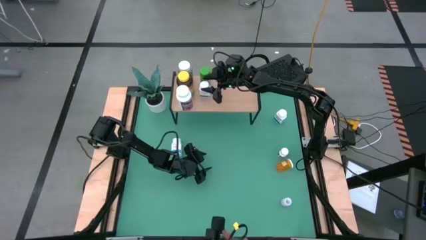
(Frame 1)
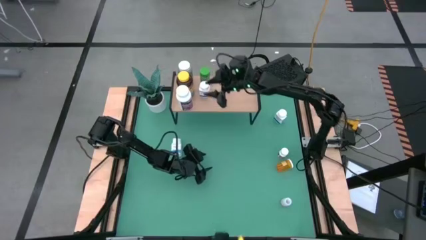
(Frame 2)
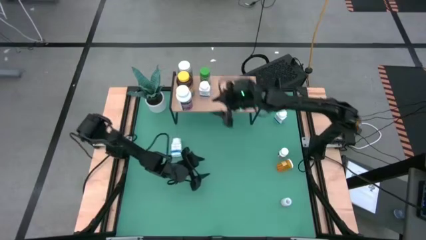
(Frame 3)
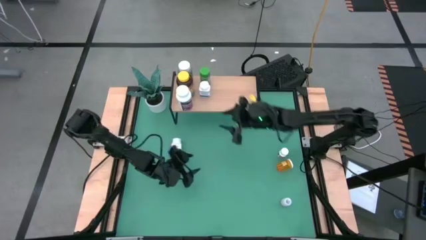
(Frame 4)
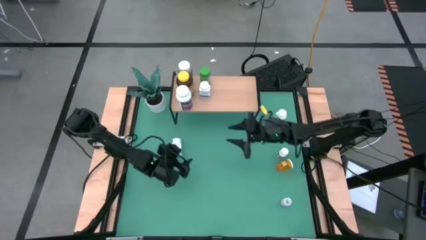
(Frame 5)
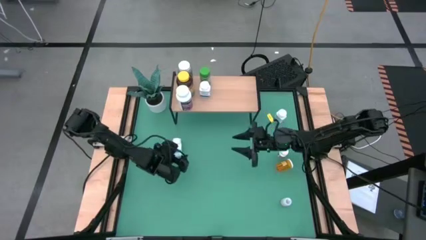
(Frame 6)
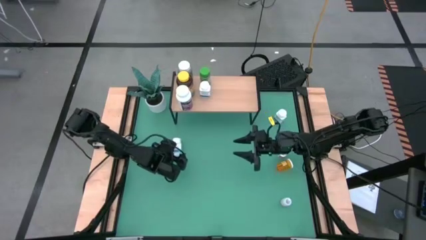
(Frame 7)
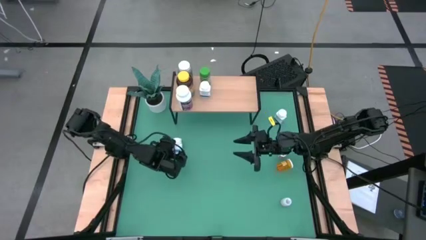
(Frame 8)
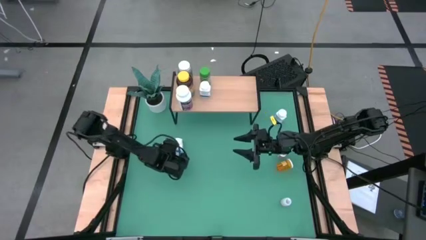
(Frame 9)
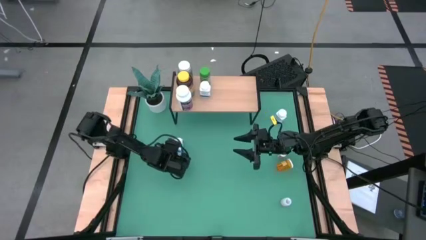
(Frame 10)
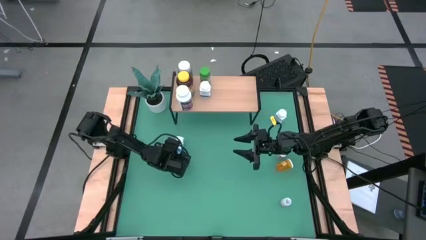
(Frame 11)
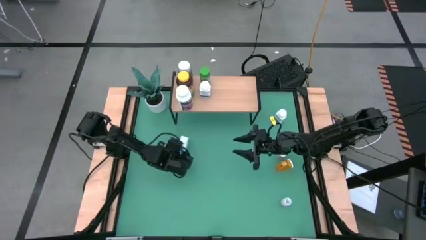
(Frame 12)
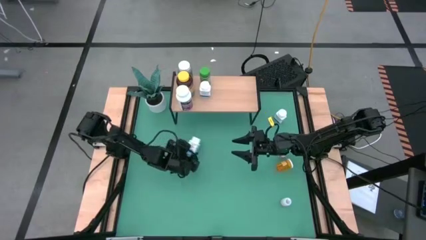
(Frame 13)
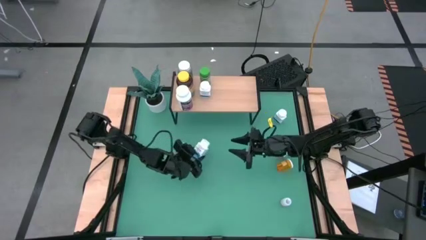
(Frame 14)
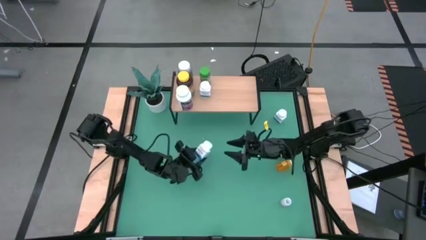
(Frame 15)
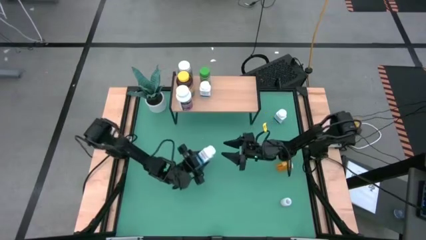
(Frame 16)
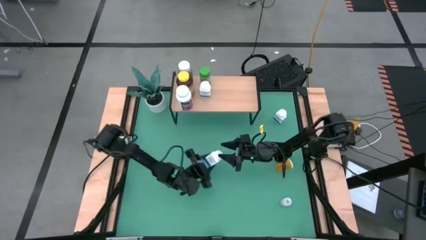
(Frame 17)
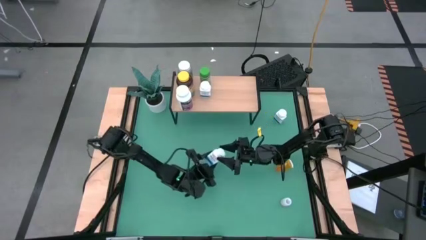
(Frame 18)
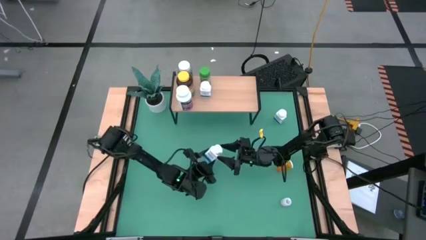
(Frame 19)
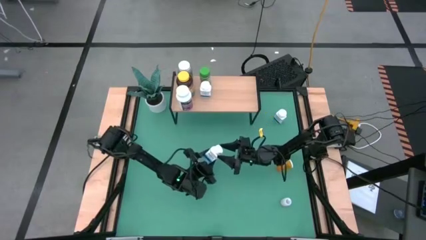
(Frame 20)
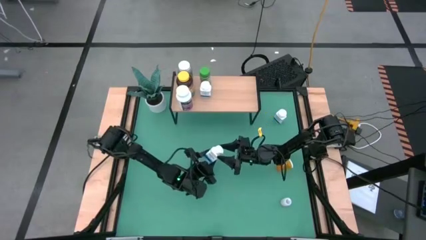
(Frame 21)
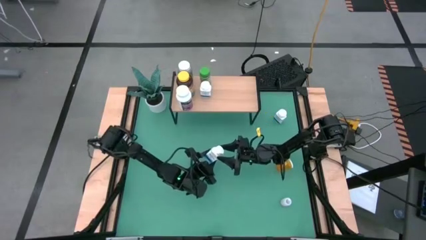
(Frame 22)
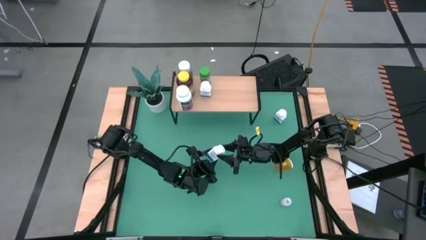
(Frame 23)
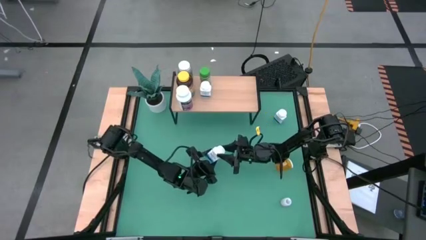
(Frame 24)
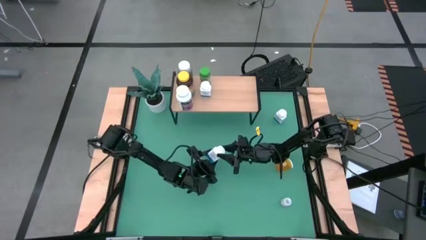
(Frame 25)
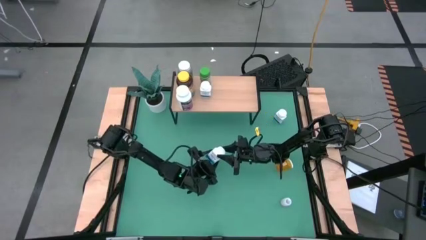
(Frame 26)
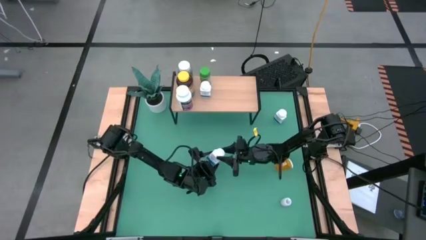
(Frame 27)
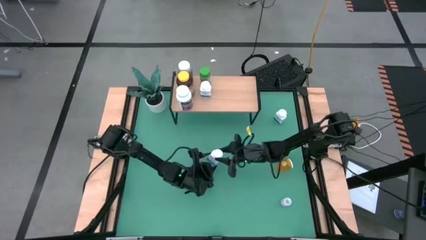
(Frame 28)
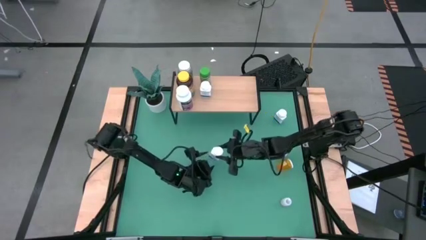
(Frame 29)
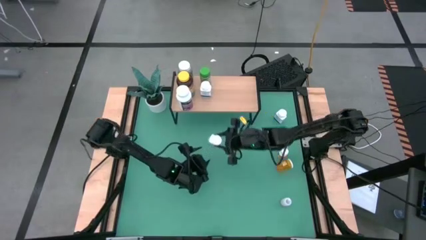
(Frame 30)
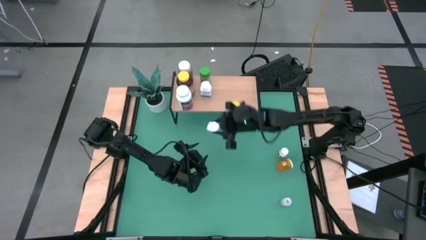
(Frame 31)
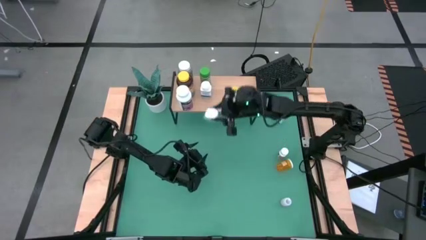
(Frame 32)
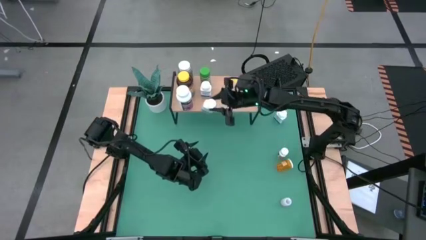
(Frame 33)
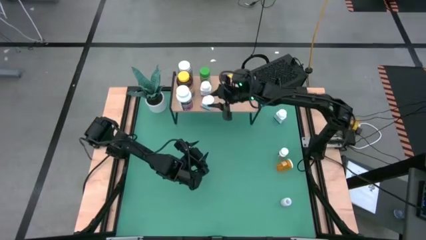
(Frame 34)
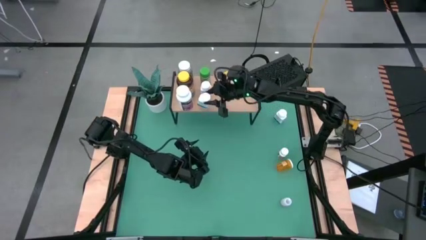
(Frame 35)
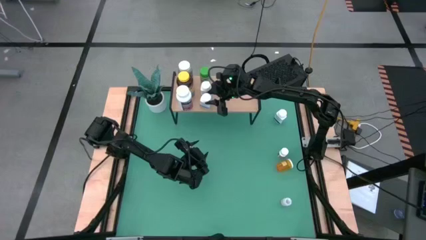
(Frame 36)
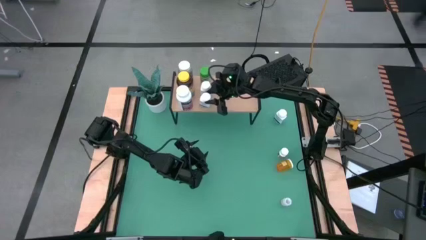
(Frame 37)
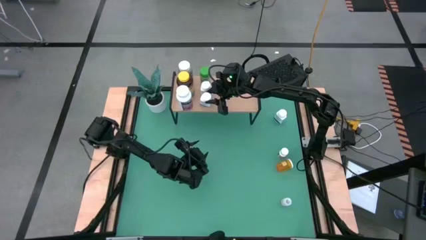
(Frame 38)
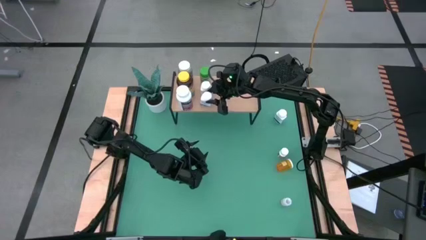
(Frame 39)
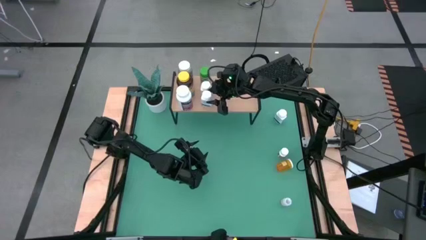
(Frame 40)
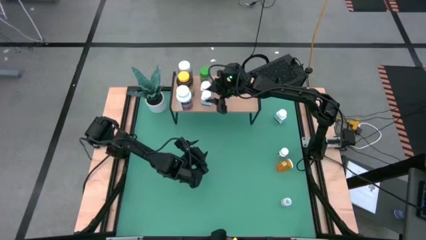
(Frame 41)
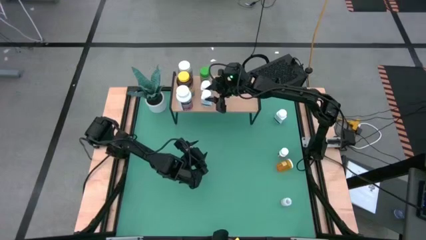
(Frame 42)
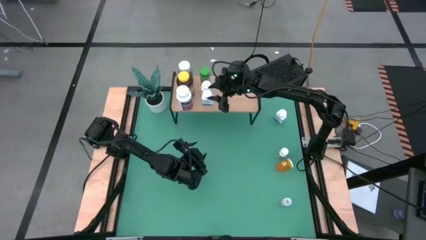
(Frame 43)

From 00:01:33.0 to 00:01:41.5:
Task: Pick and place medicine bottles onto shelf by color
Put the bottom blue white pill bottle on the shelf

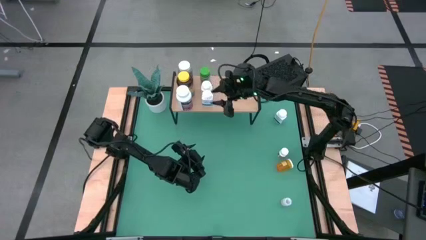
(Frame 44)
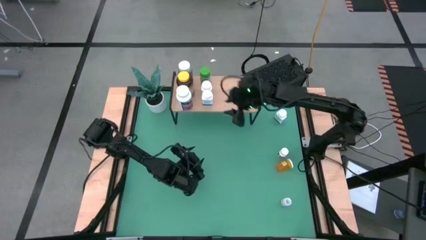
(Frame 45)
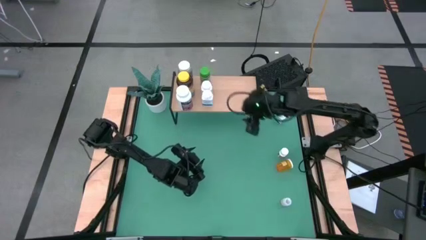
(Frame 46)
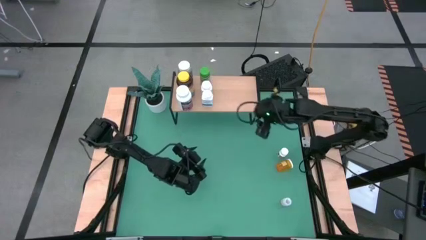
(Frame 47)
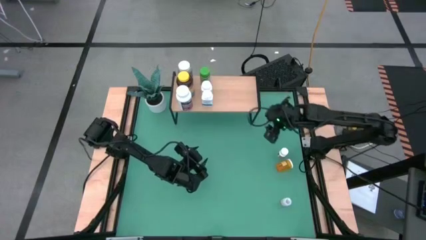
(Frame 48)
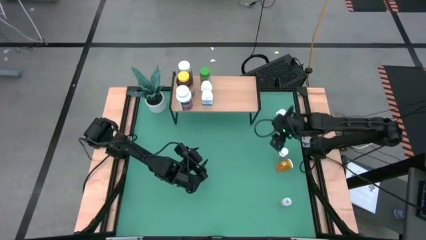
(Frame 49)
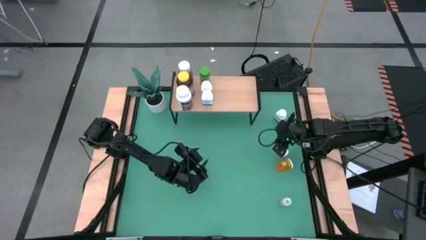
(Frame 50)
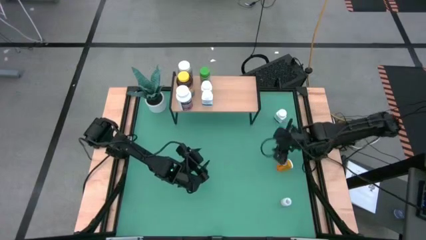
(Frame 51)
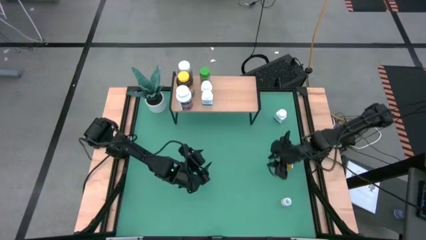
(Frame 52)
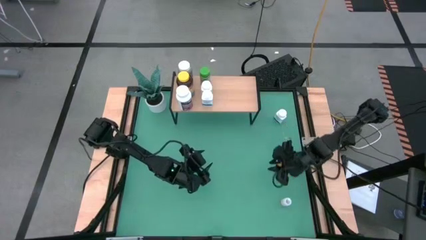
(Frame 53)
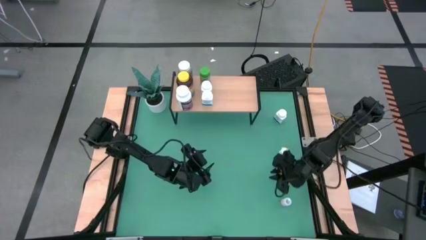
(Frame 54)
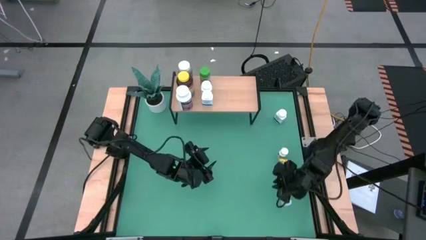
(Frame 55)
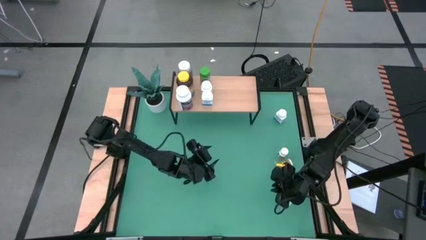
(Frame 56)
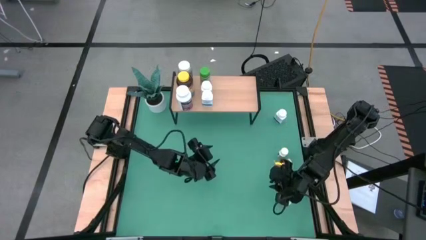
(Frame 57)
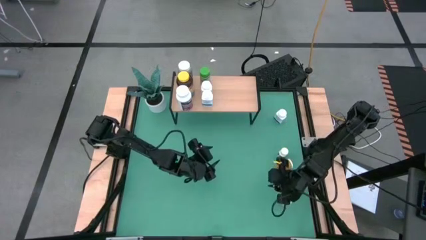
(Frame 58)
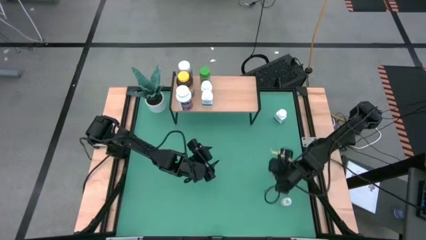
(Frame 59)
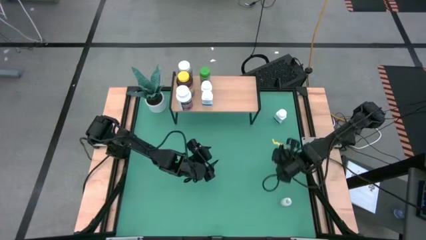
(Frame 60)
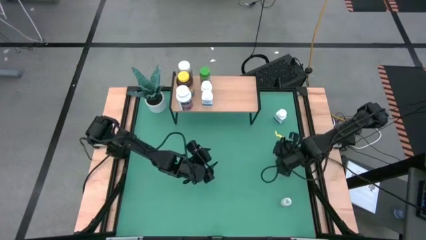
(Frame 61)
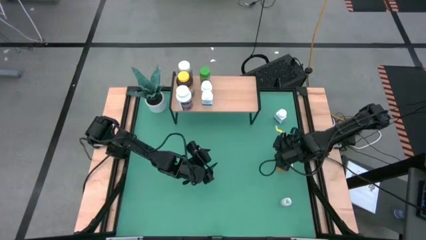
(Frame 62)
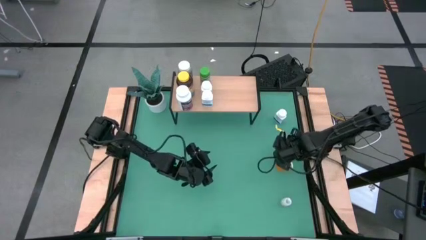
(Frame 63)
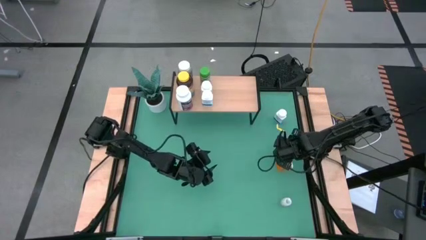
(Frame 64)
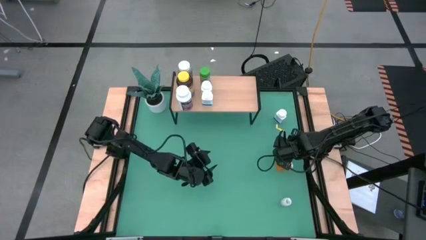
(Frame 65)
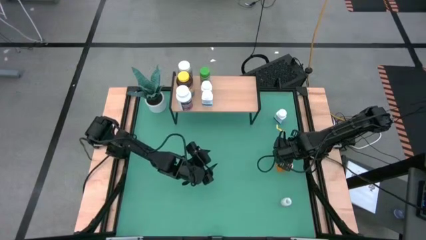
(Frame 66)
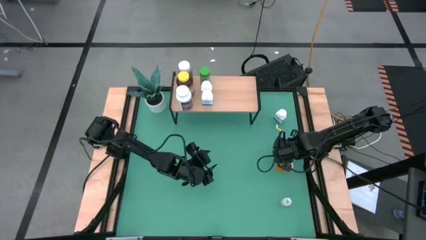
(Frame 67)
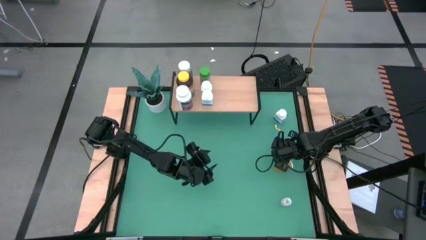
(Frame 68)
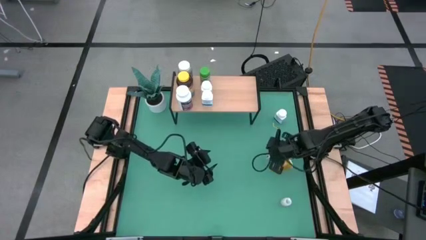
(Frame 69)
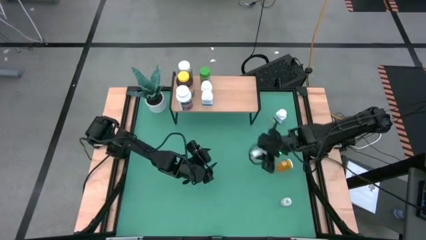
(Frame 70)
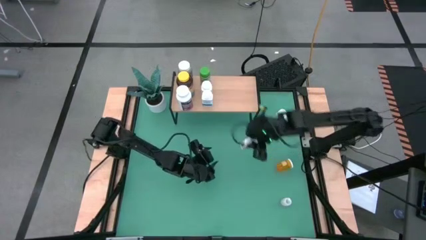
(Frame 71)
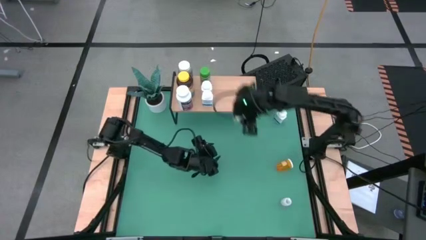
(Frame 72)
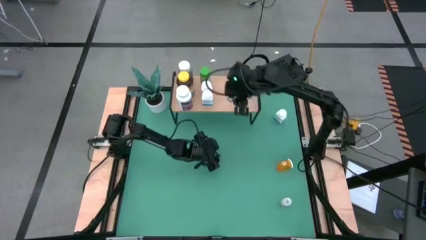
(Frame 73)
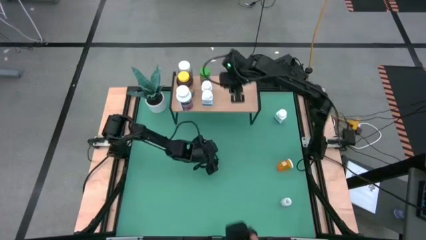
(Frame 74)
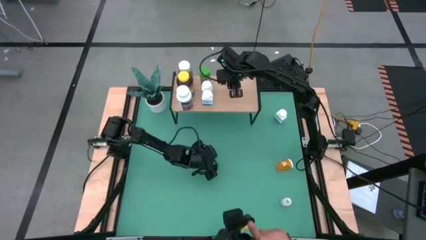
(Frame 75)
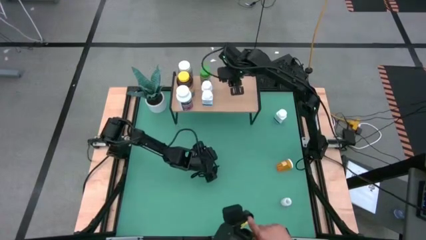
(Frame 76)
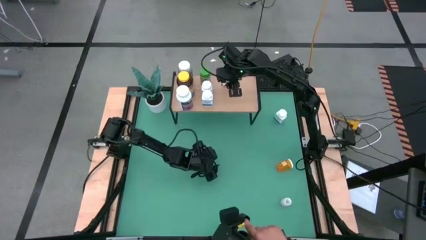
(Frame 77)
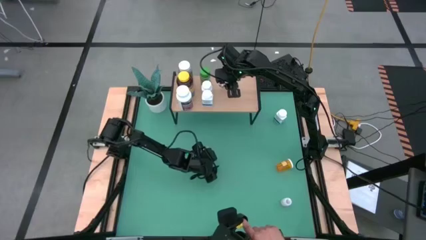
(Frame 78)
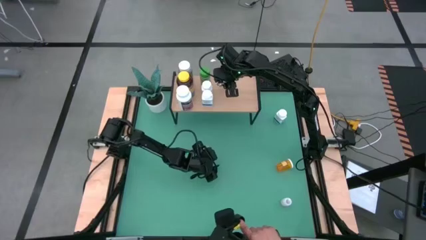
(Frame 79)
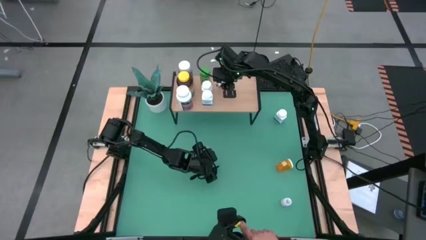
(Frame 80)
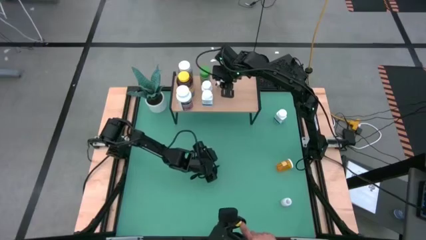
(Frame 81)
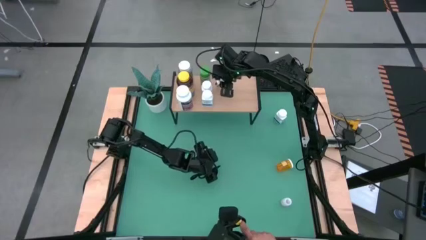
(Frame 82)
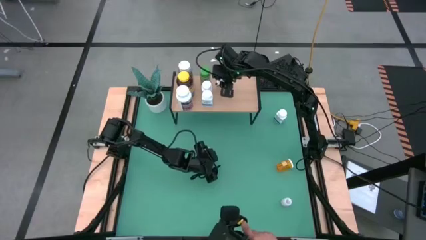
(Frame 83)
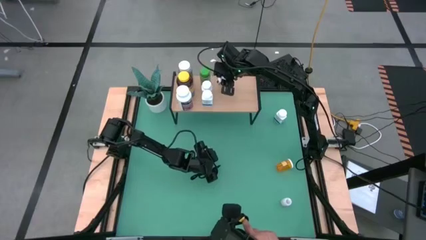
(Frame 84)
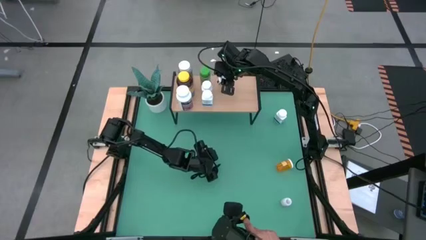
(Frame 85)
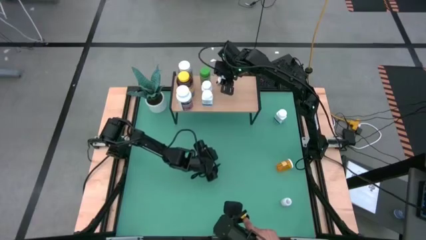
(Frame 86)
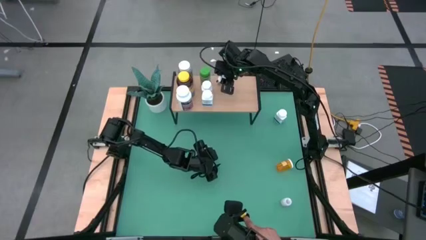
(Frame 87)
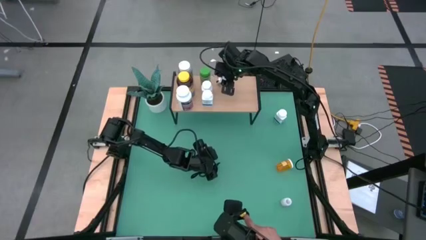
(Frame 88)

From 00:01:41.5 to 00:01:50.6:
Put the black white pill bottle on the shelf
